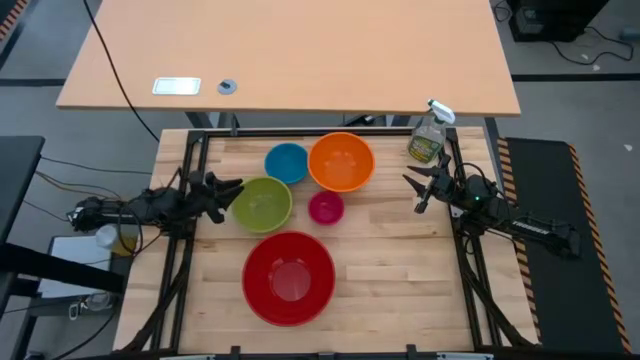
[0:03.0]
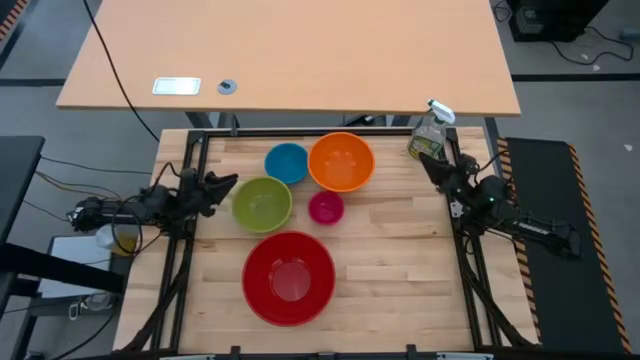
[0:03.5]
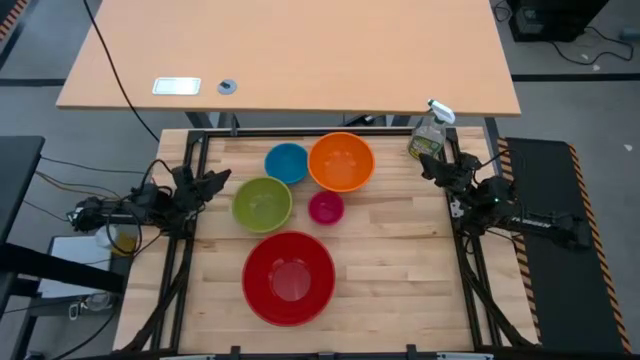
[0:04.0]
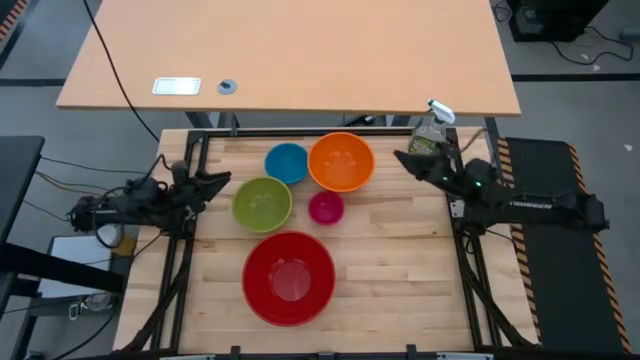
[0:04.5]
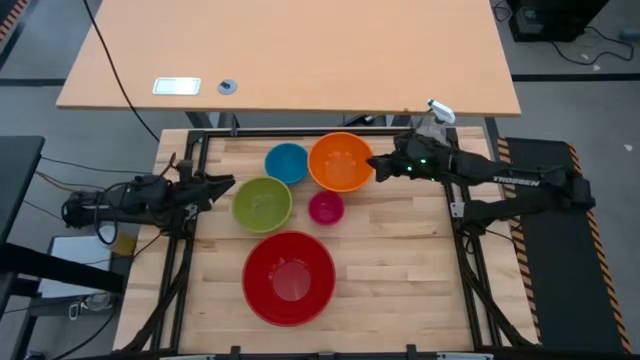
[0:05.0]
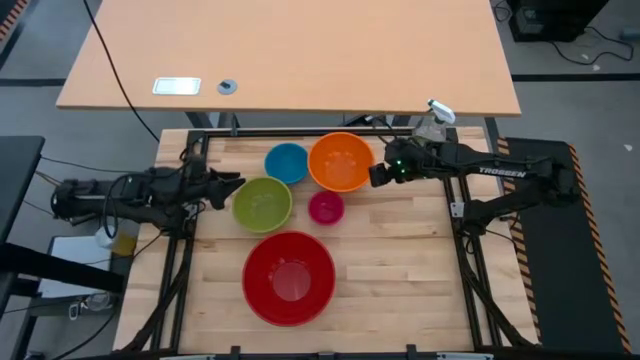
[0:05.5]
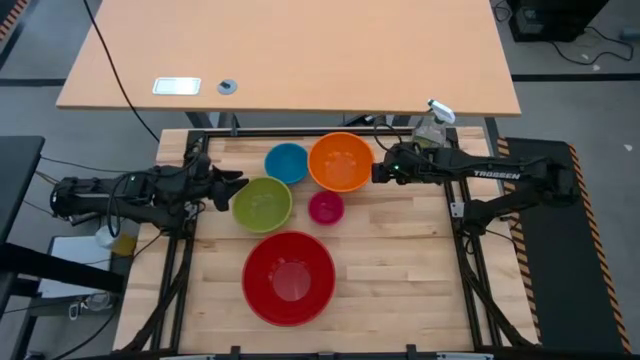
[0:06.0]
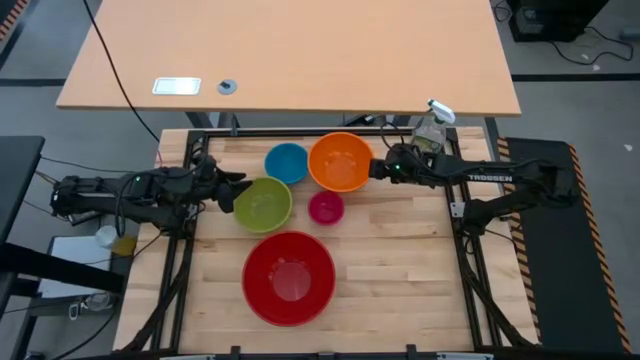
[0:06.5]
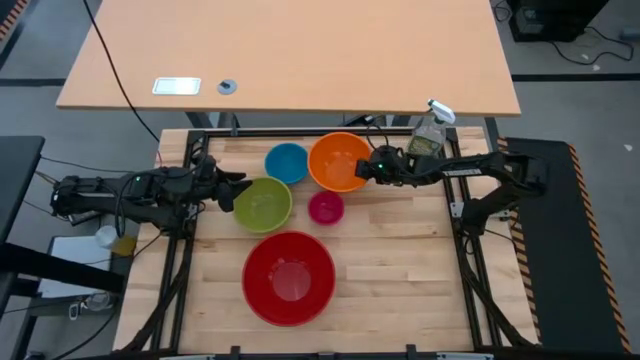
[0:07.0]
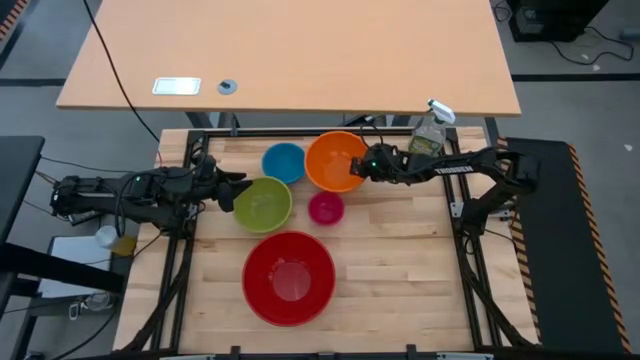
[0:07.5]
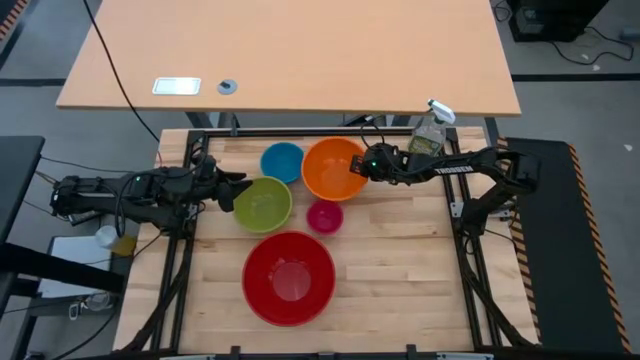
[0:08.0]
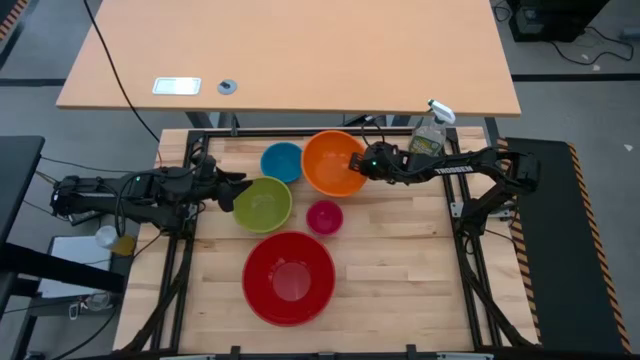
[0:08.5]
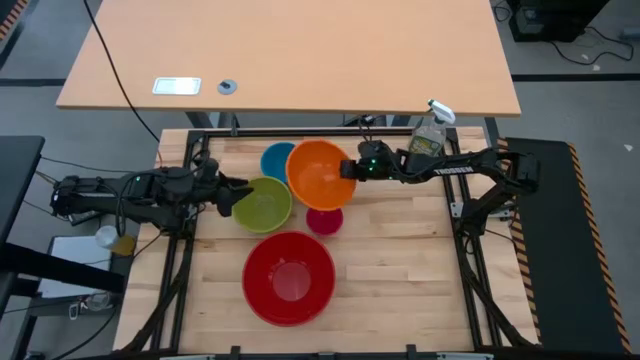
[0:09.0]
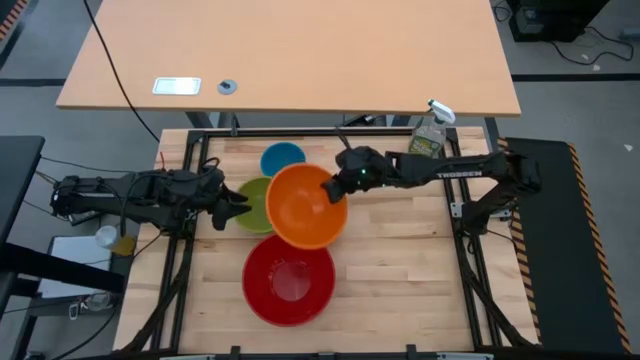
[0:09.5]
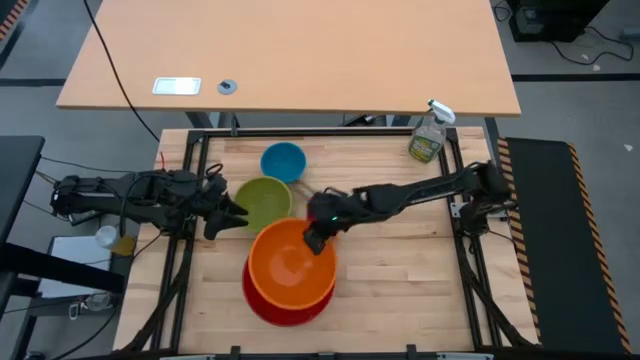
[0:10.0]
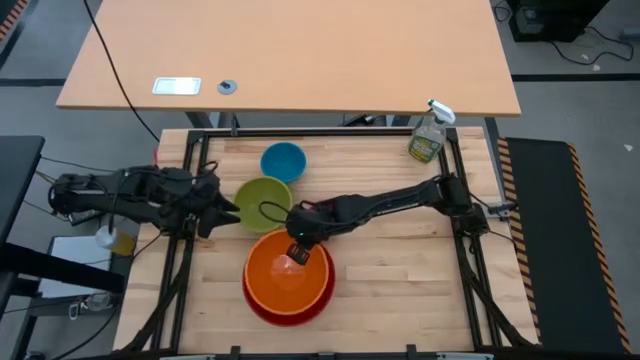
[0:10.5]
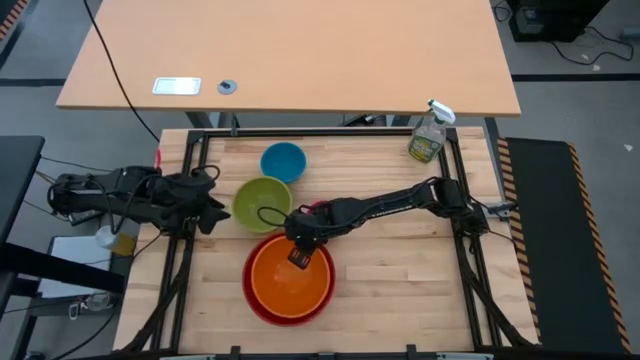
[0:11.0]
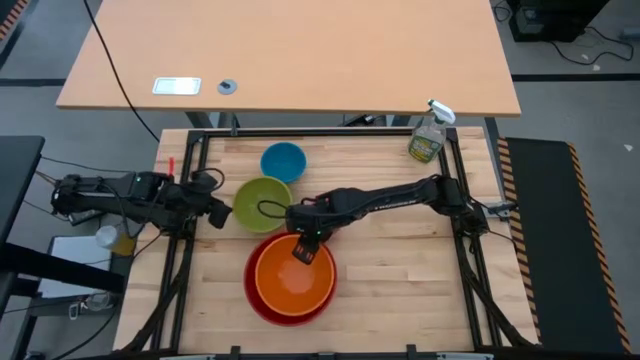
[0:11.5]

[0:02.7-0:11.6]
Stack the orange bowl on the red bowl

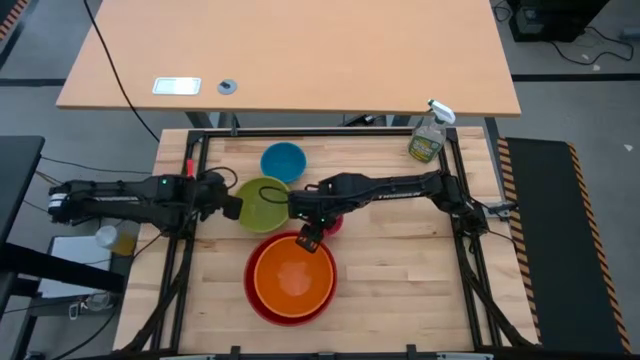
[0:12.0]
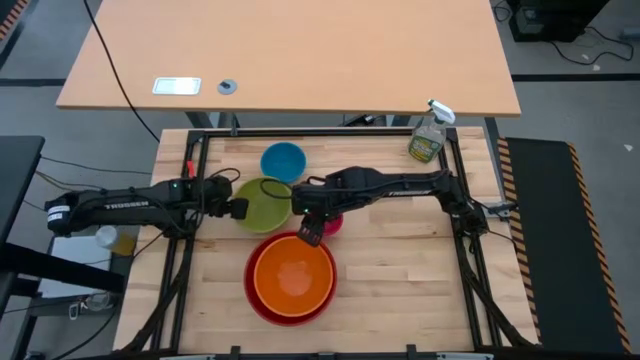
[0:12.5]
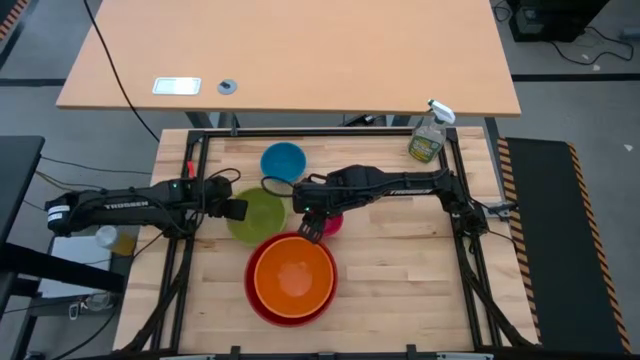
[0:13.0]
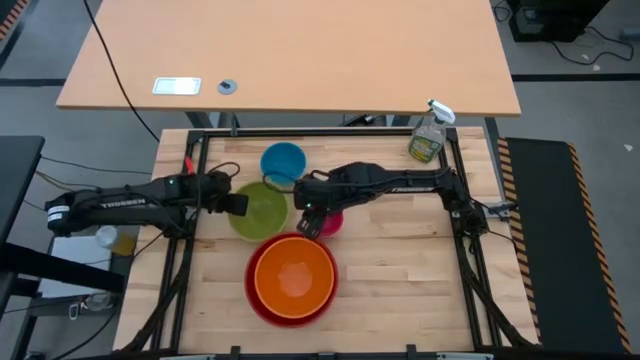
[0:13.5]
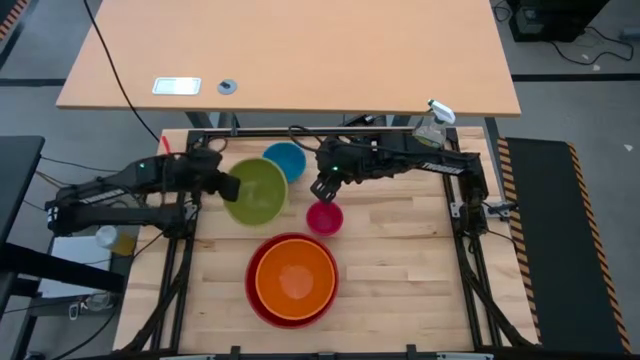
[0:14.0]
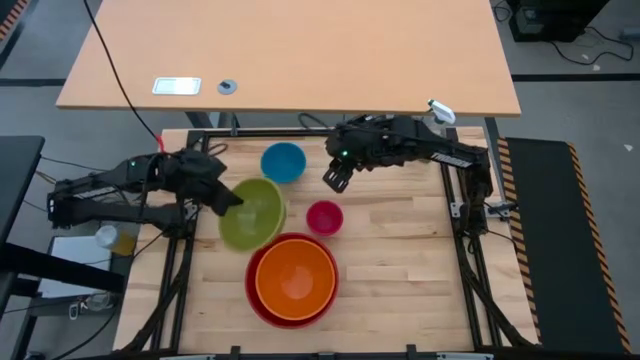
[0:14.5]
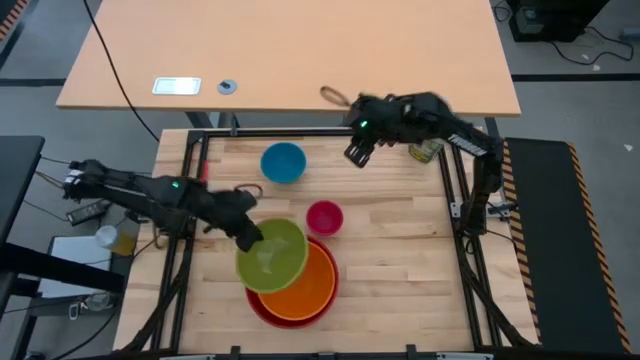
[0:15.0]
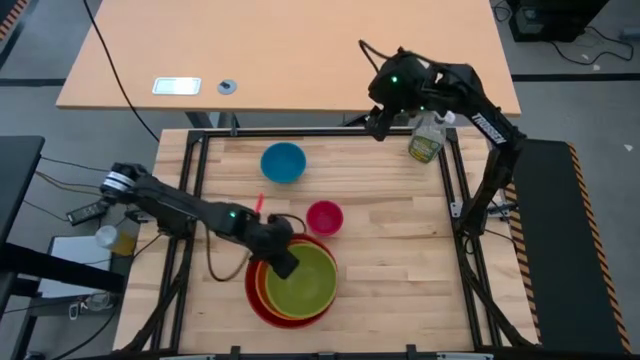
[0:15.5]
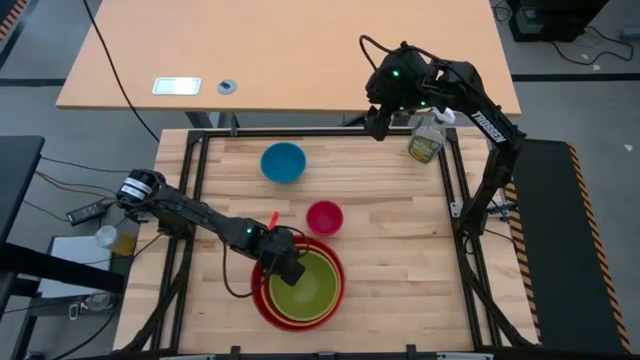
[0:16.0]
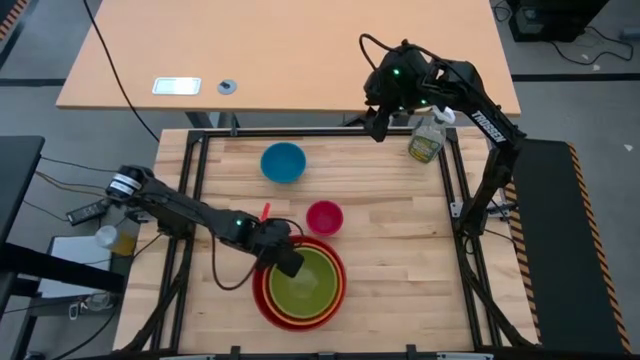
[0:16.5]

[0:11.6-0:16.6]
Stack the green bowl on the orange bowl

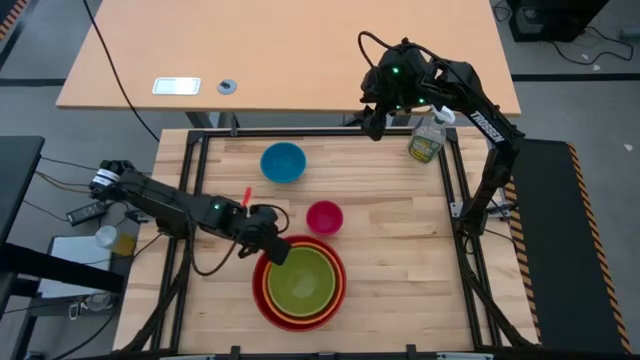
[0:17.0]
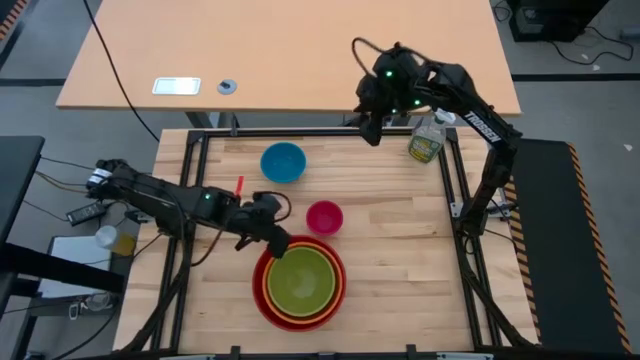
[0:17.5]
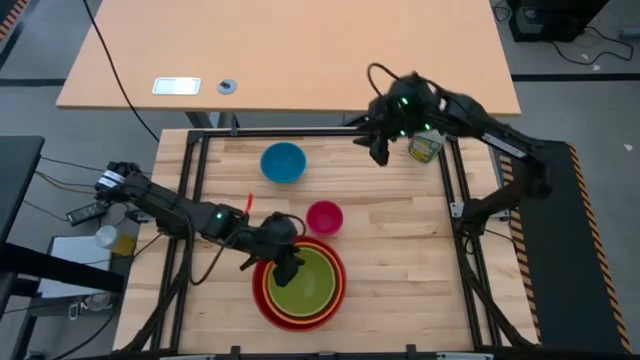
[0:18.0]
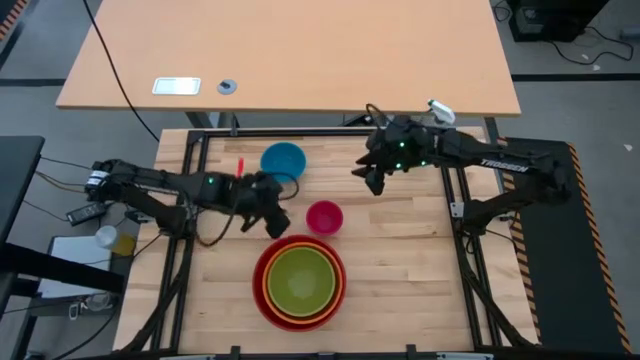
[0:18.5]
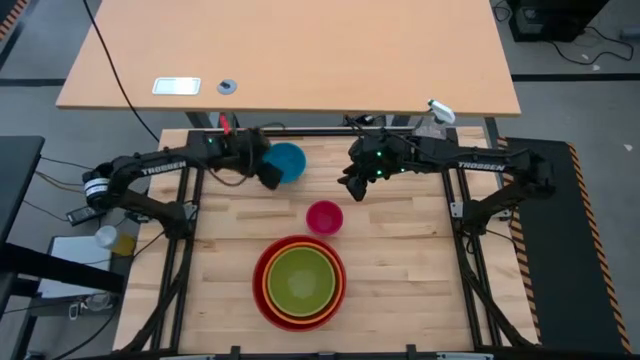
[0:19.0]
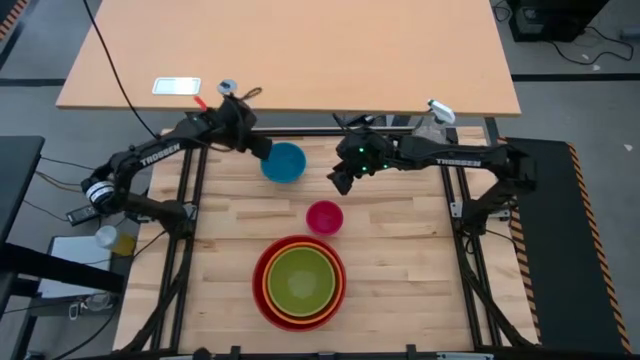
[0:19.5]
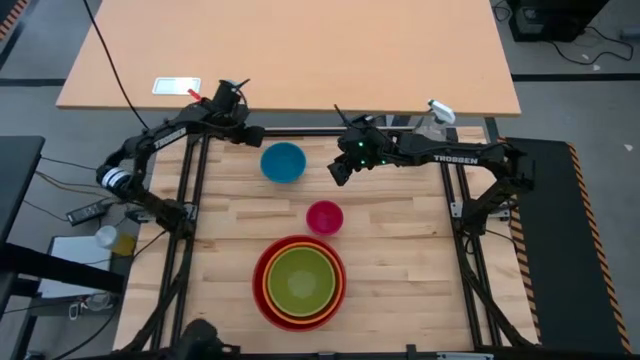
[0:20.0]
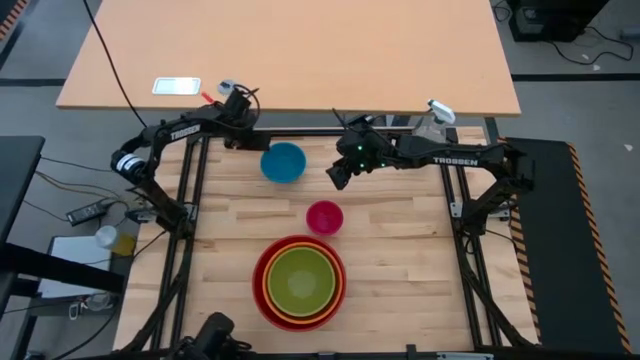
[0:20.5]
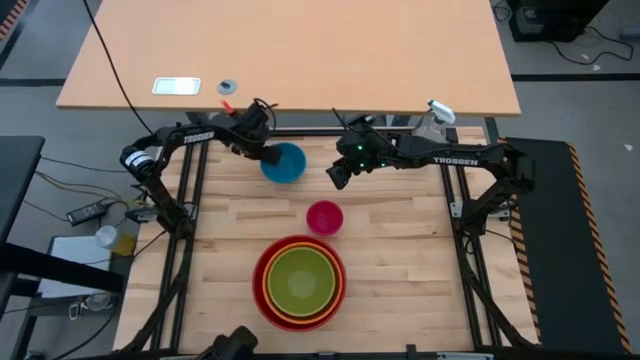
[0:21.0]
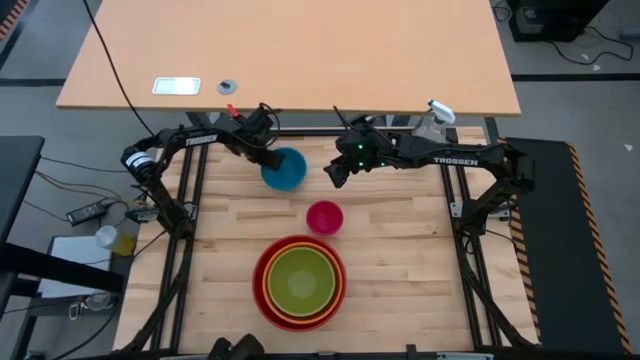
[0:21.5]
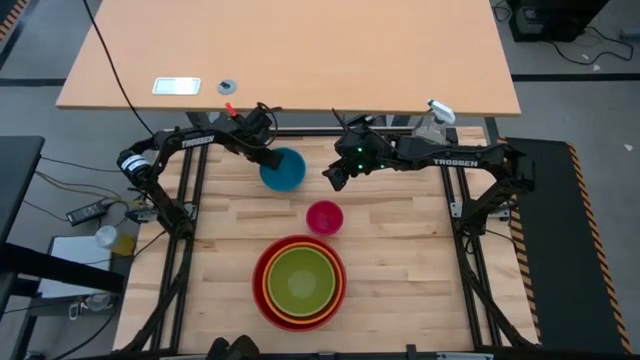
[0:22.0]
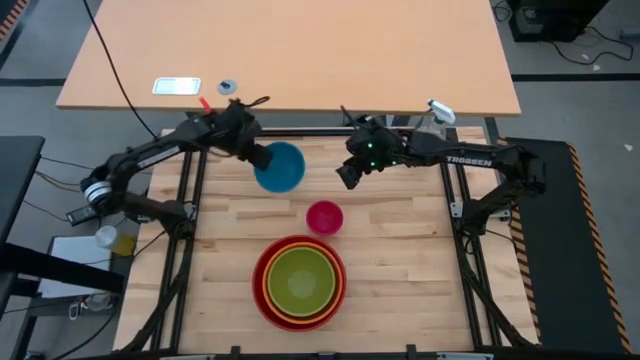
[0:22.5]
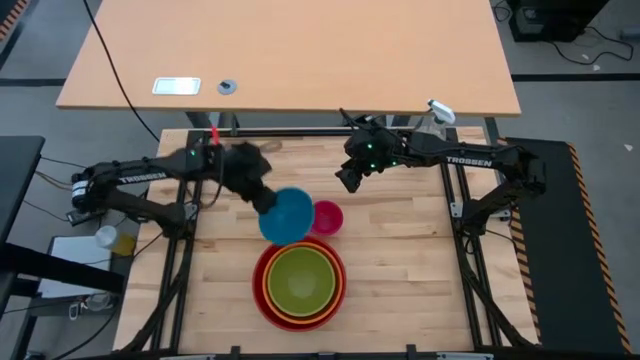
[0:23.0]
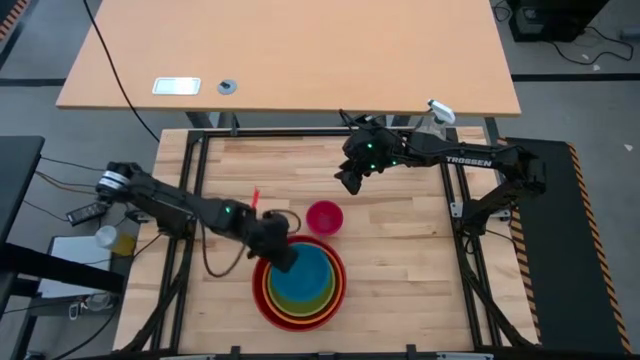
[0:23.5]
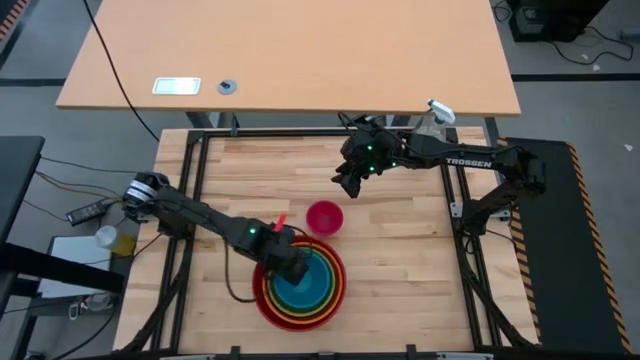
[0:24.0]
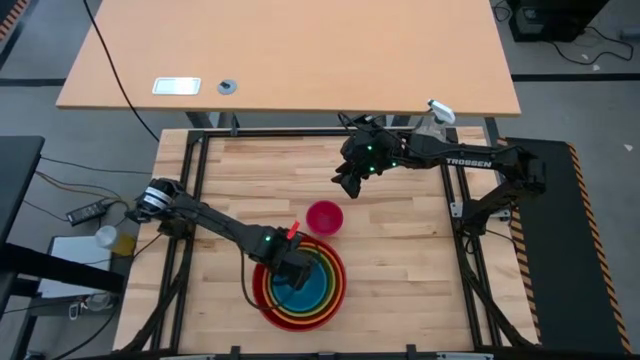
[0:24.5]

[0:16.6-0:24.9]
Stack the blue bowl on the green bowl
